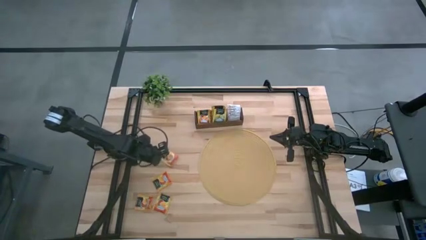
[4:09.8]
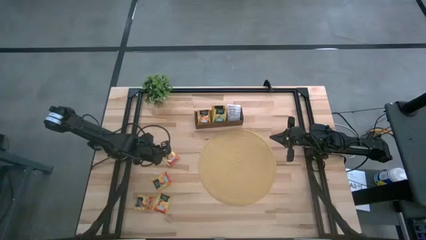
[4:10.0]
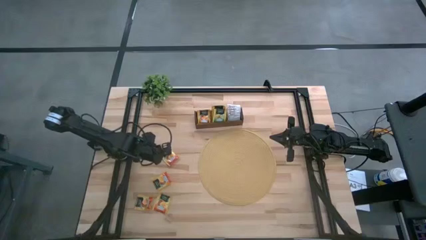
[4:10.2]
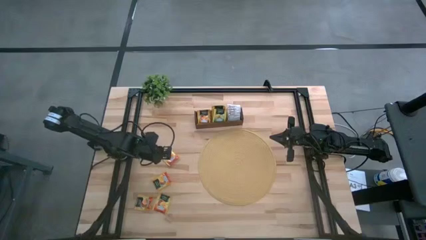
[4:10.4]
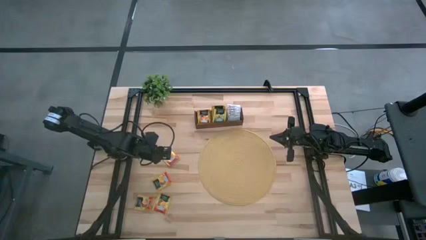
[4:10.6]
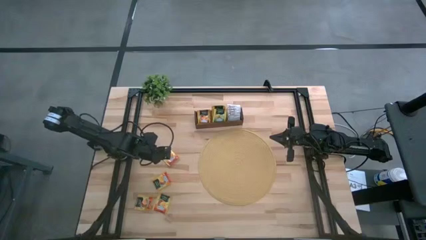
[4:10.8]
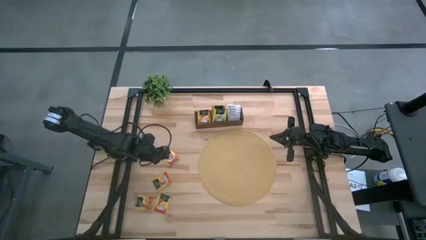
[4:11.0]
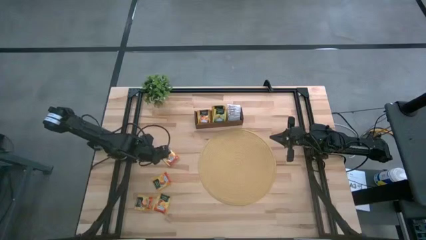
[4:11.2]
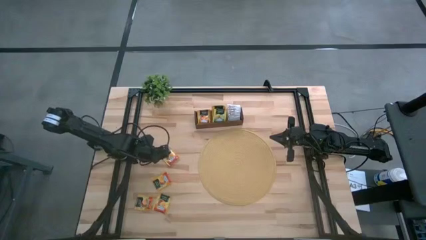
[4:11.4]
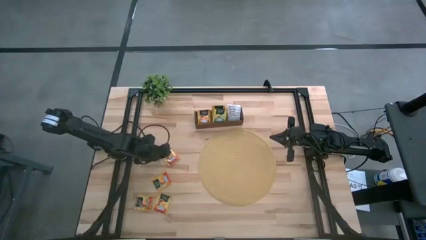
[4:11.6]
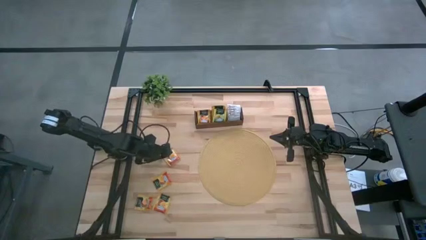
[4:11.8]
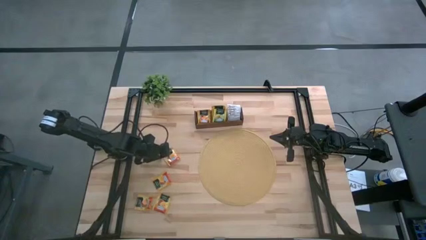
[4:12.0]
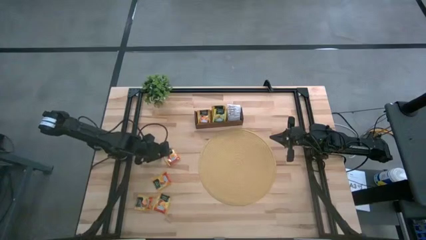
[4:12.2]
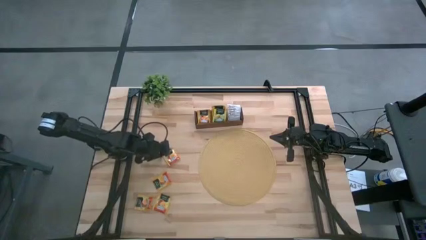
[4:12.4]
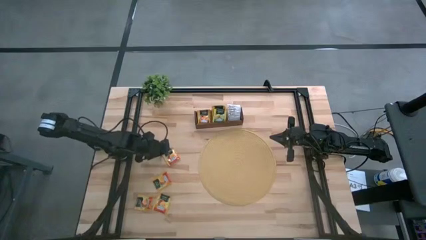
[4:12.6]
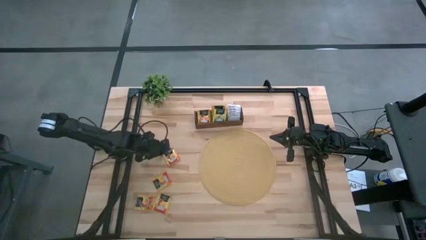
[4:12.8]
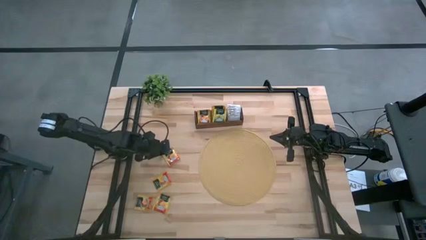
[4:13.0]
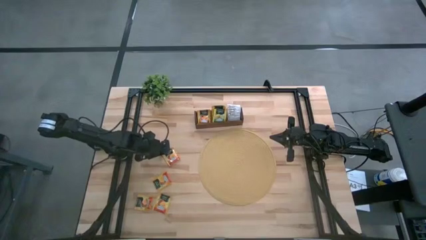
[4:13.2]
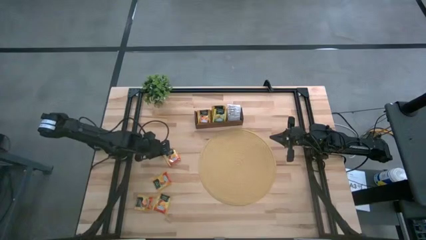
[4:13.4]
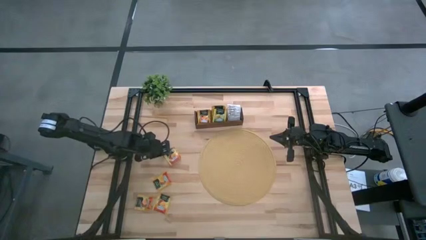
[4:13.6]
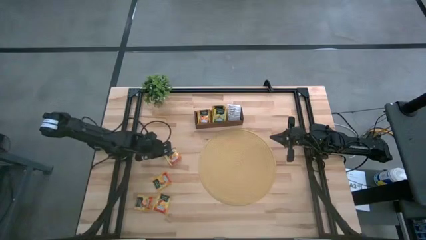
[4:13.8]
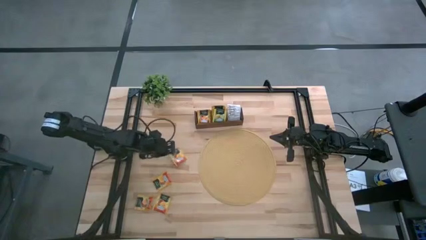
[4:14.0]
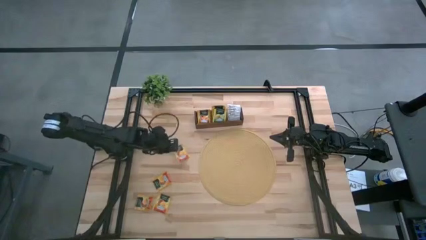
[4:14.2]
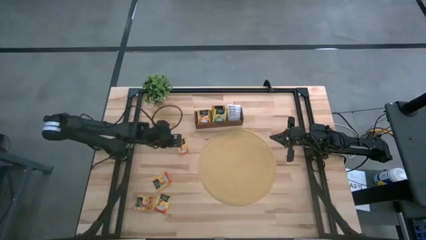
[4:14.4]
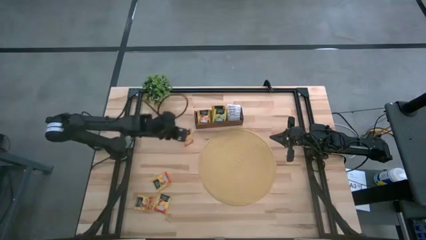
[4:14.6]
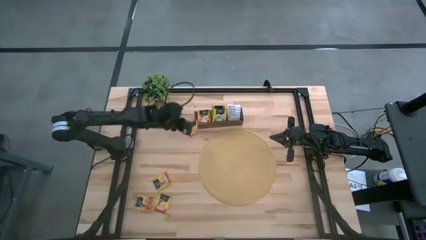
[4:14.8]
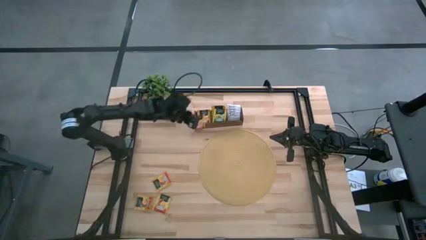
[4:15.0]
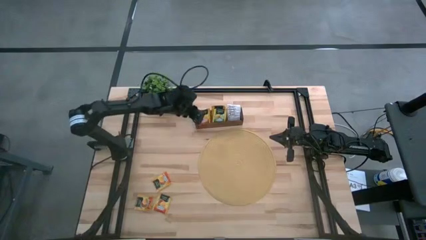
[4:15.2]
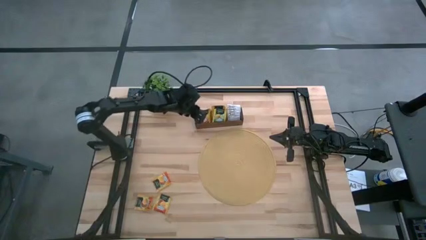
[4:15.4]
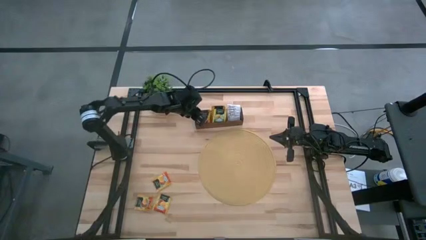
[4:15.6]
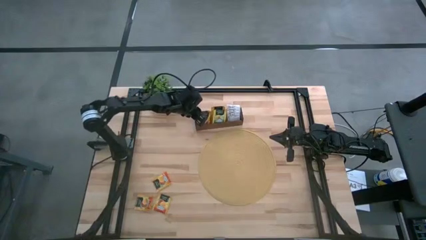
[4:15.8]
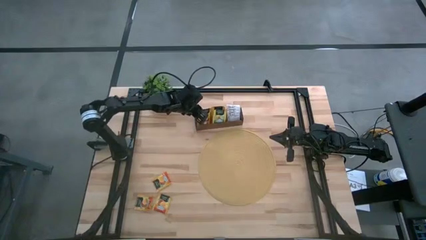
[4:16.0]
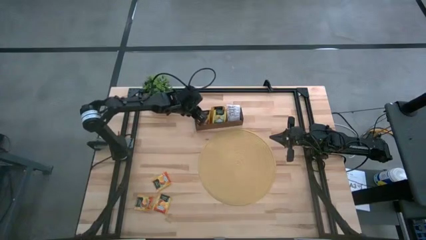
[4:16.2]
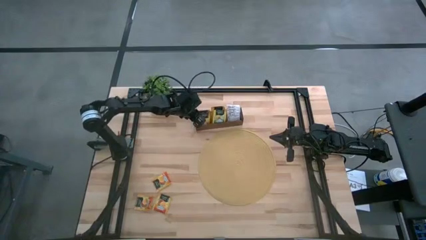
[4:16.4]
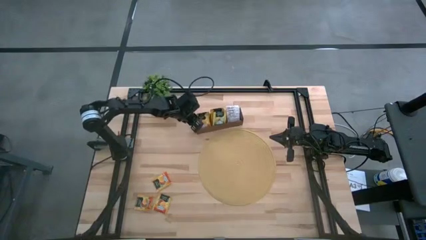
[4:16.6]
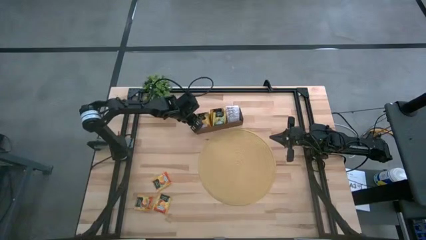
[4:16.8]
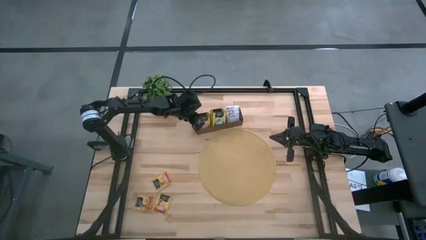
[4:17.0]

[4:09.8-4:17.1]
Task: Pick & Place Tea
Put the orange tea bag into the left section of the wooden organizer

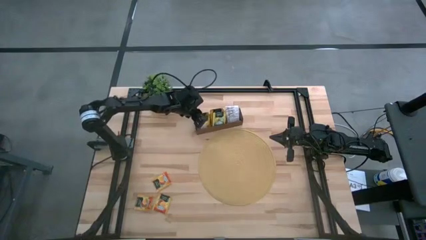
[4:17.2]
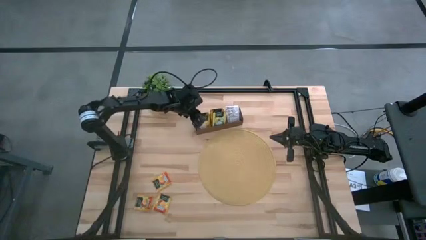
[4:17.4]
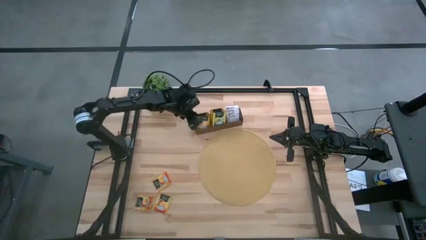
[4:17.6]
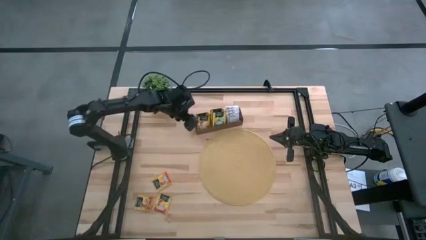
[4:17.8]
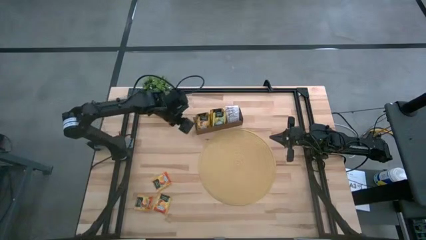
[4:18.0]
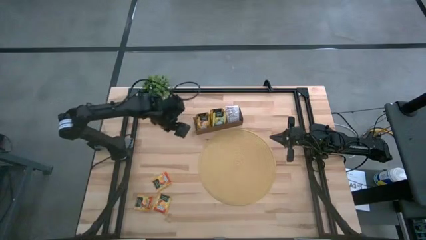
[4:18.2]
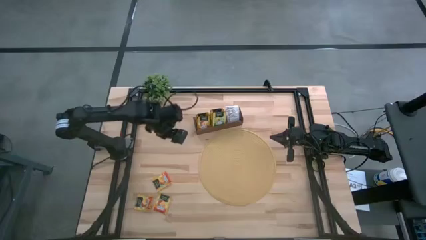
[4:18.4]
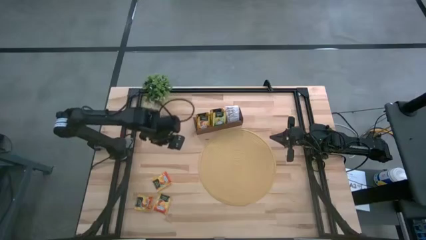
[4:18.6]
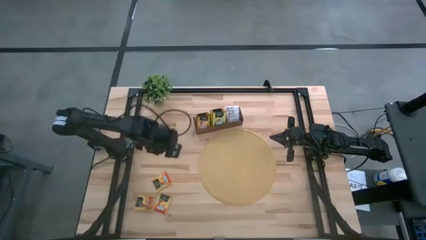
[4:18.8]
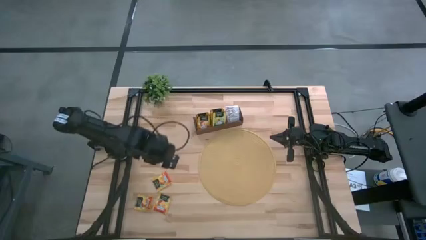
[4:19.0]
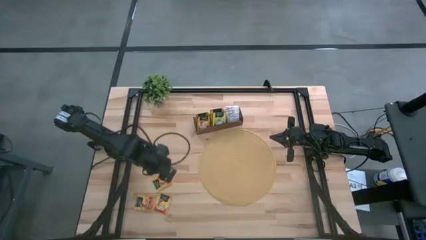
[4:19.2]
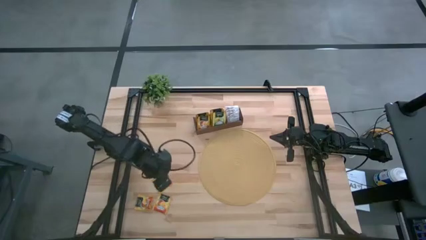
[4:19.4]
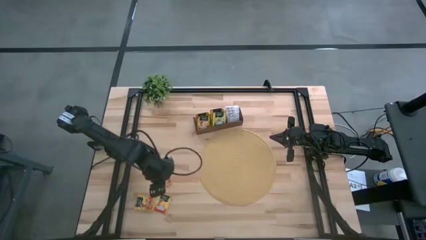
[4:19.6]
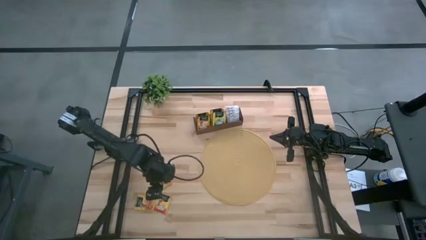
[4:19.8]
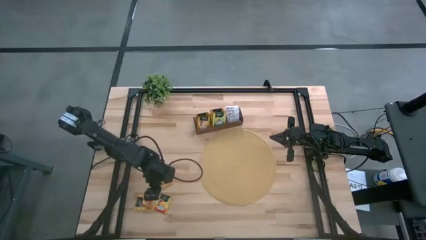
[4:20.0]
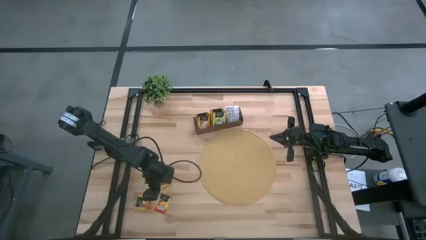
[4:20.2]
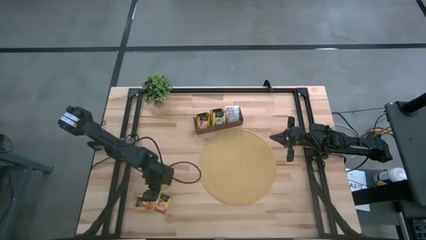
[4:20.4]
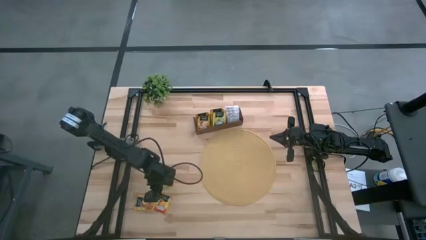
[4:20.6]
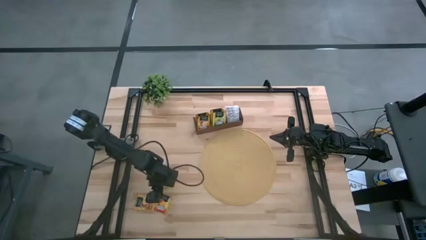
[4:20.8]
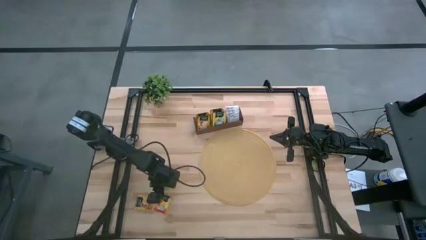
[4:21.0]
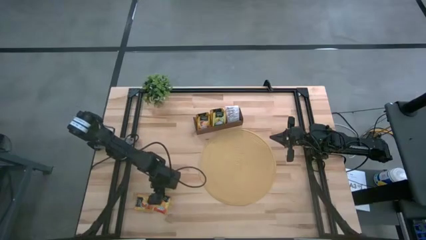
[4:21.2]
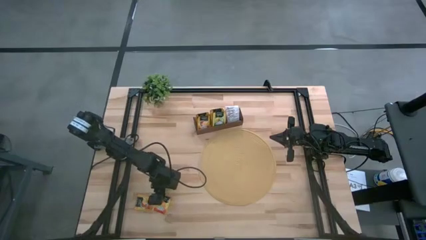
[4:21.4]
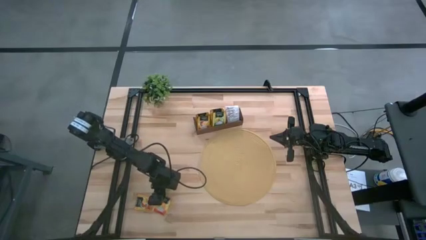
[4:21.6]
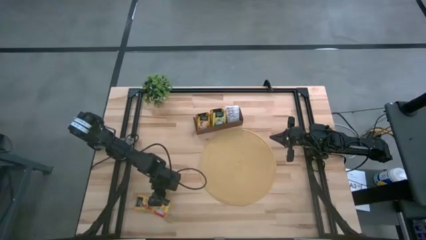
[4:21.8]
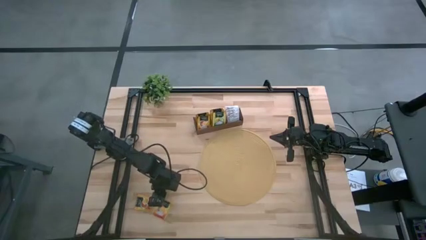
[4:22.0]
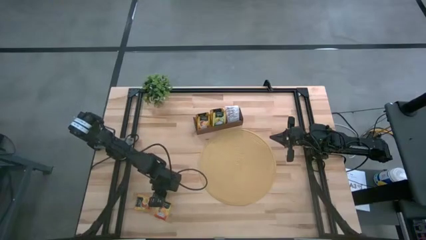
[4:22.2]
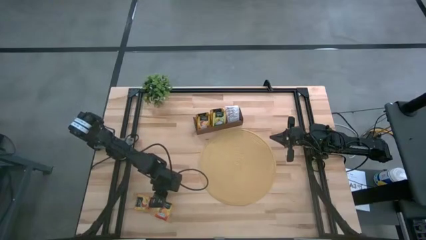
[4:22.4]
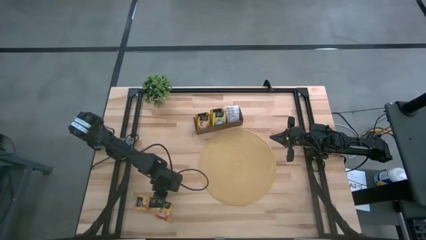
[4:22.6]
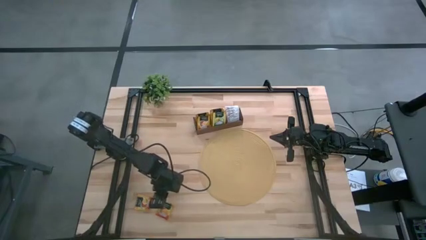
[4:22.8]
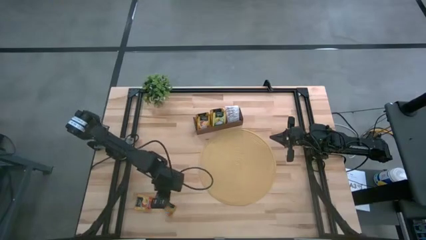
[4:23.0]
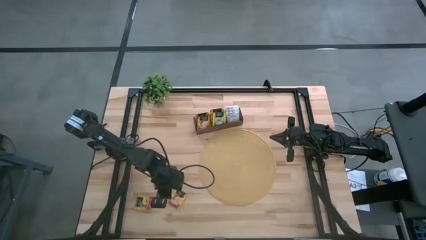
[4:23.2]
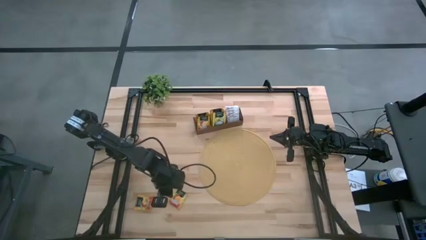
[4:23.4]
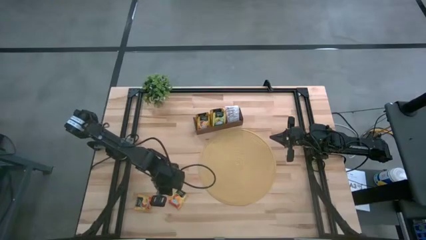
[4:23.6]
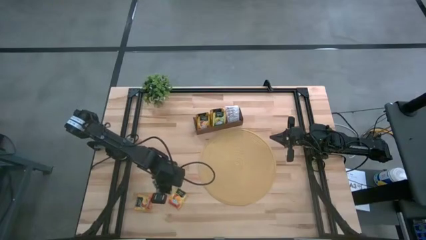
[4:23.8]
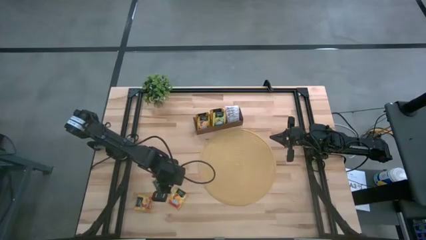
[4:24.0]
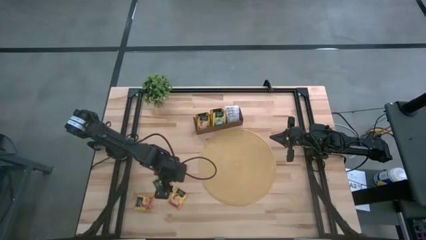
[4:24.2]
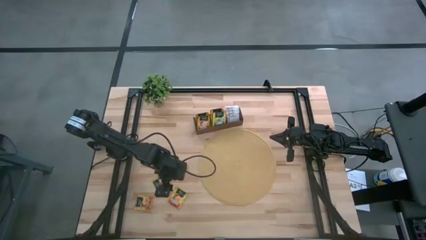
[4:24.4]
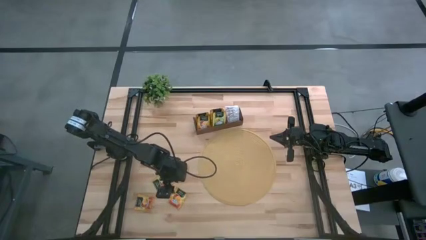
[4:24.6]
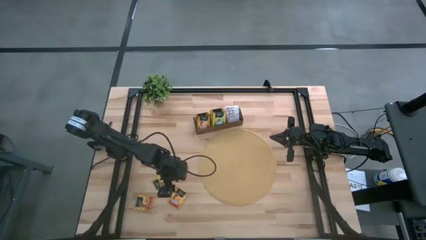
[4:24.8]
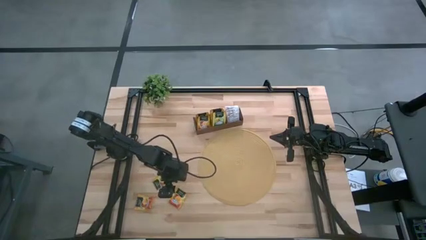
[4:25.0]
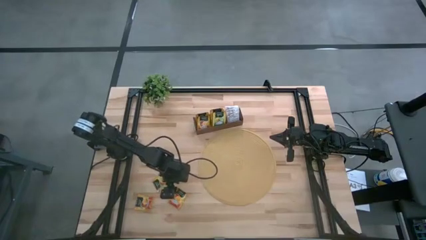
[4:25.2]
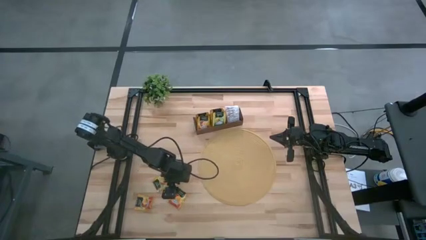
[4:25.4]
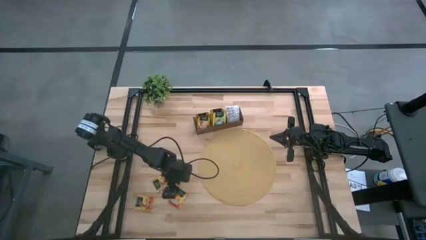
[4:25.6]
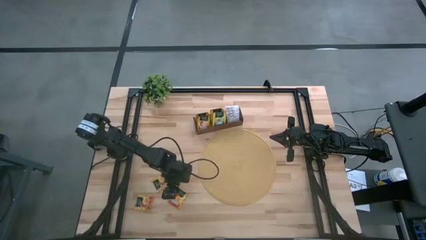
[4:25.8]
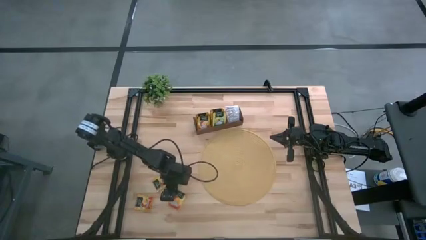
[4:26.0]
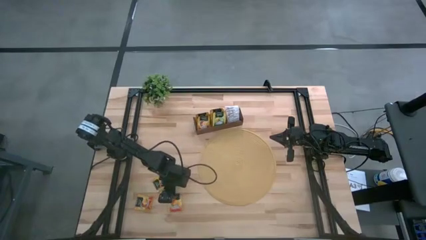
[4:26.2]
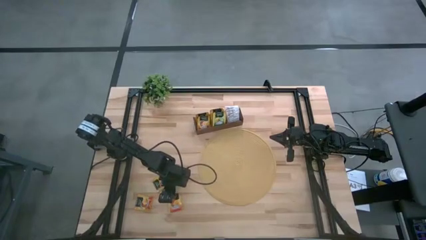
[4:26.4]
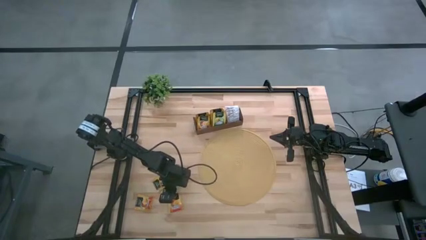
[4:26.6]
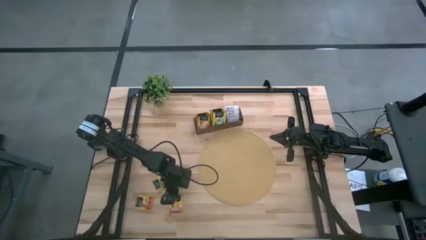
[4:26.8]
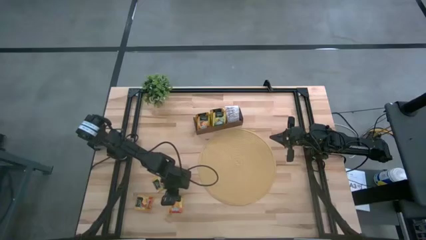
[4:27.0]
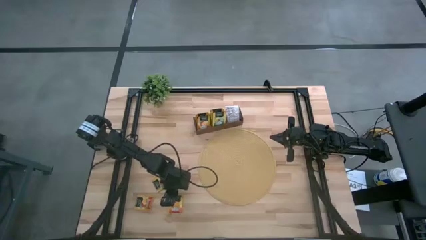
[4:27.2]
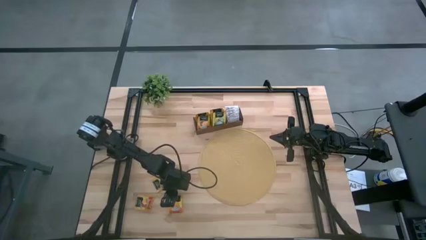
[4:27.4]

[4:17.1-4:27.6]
Put the orange tea bag into the left section of the wooden organizer
